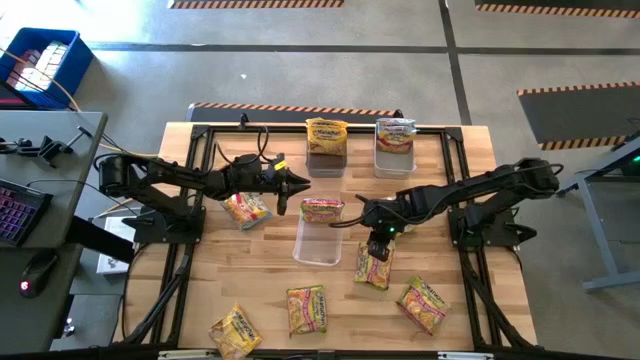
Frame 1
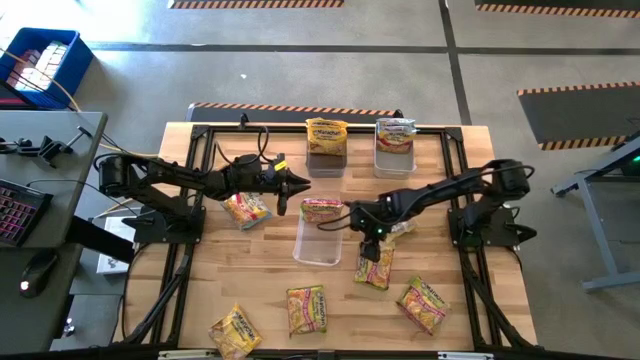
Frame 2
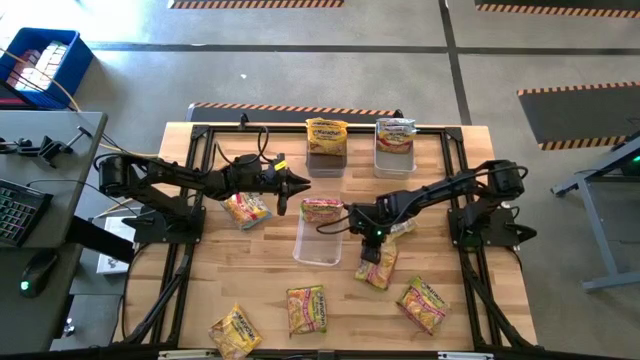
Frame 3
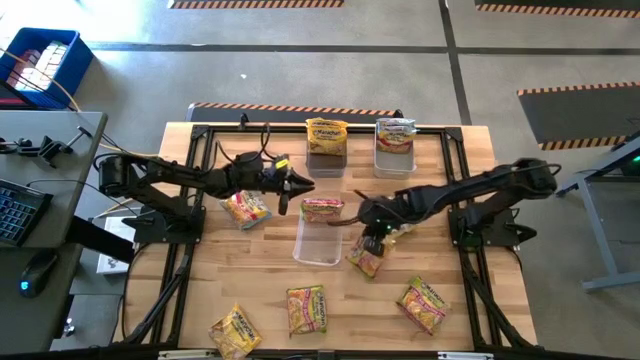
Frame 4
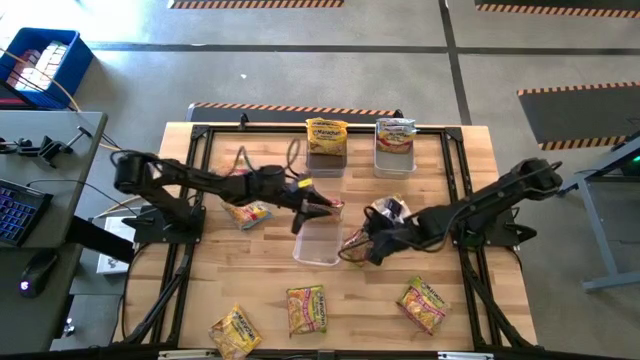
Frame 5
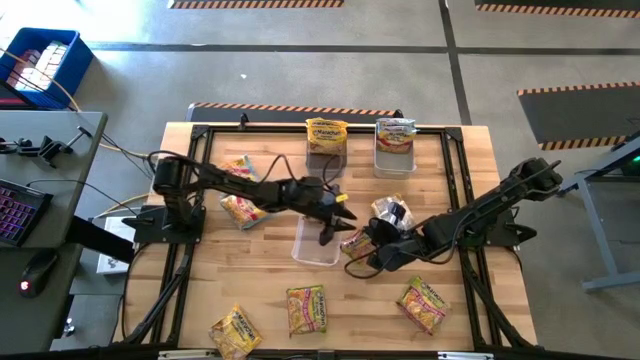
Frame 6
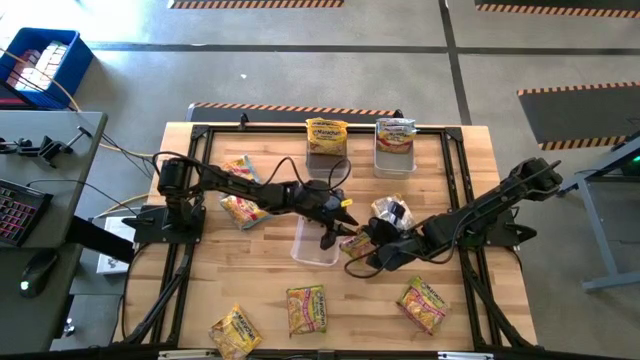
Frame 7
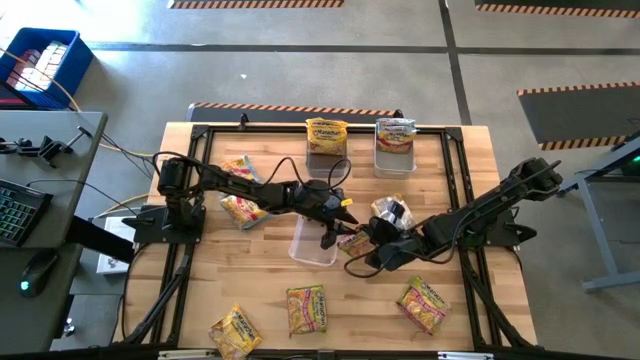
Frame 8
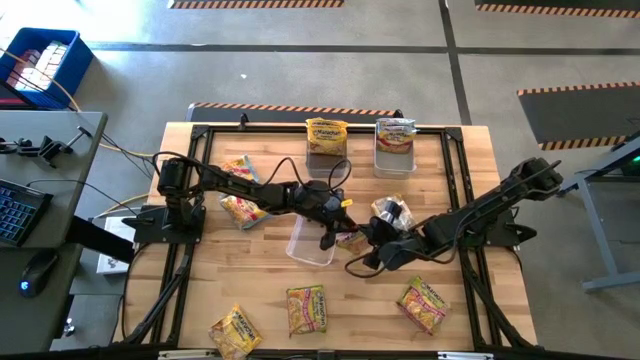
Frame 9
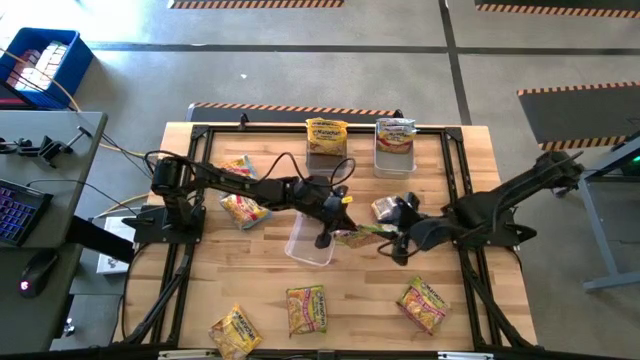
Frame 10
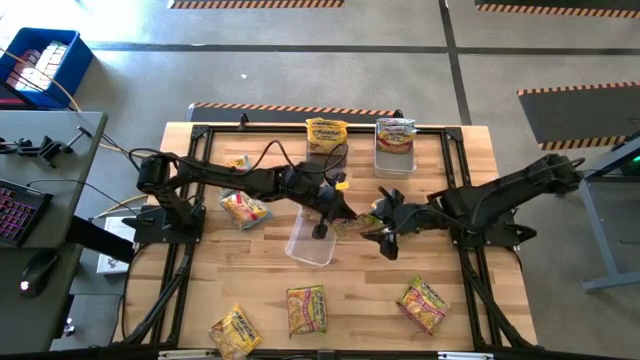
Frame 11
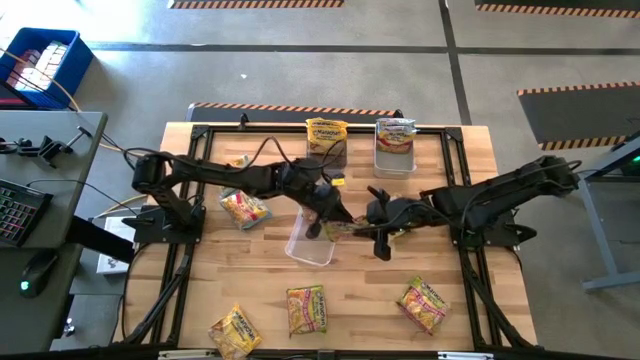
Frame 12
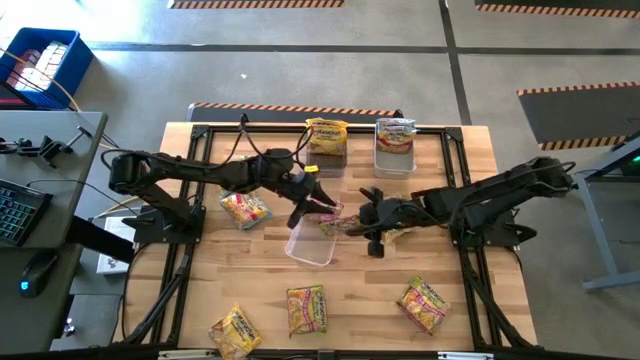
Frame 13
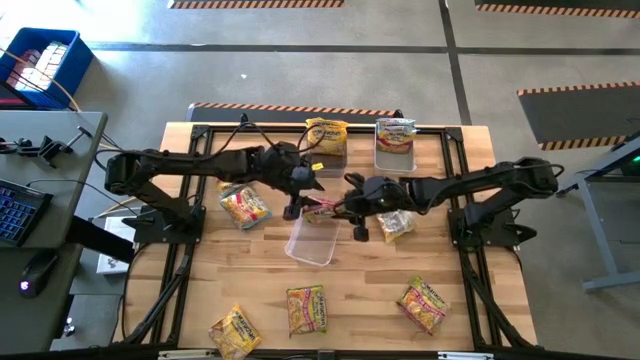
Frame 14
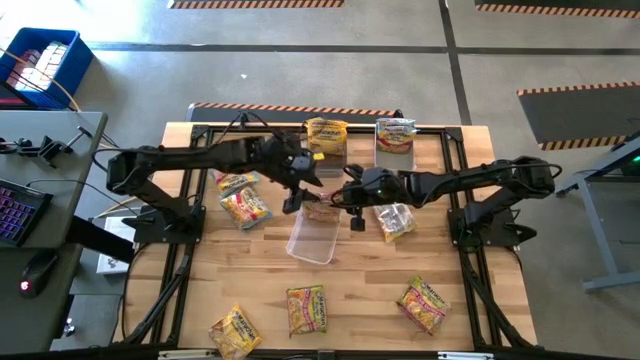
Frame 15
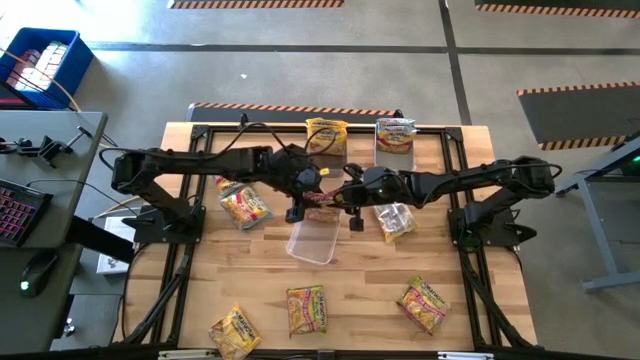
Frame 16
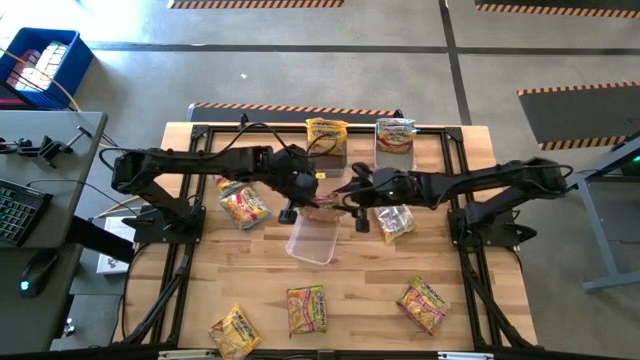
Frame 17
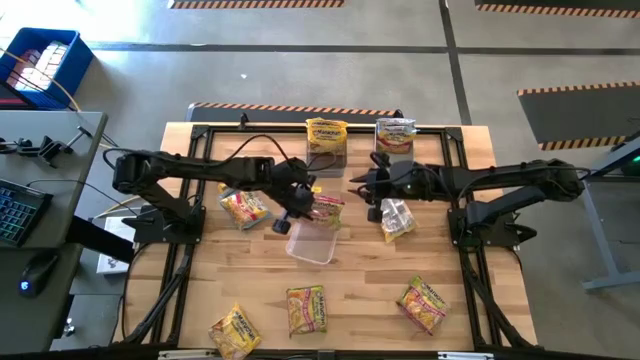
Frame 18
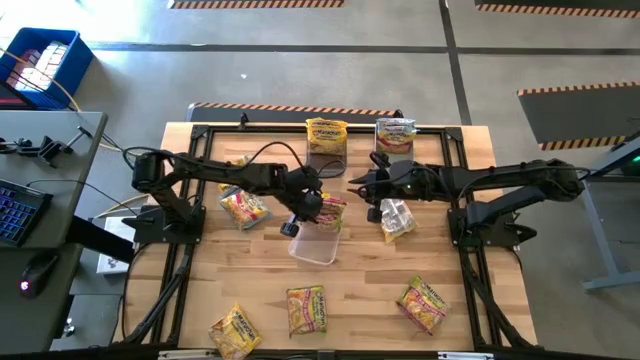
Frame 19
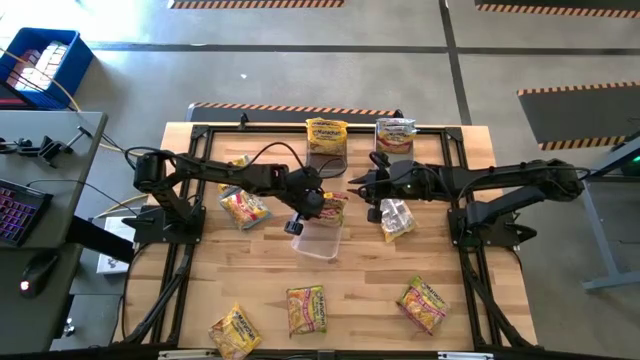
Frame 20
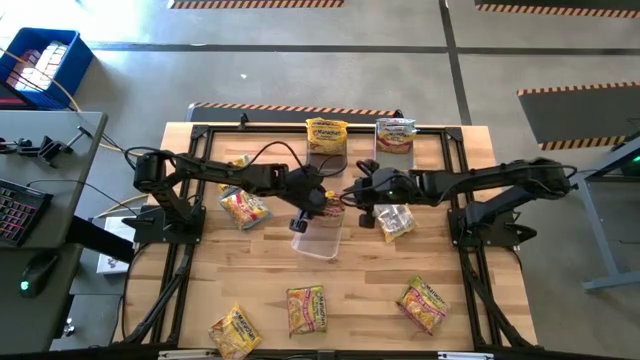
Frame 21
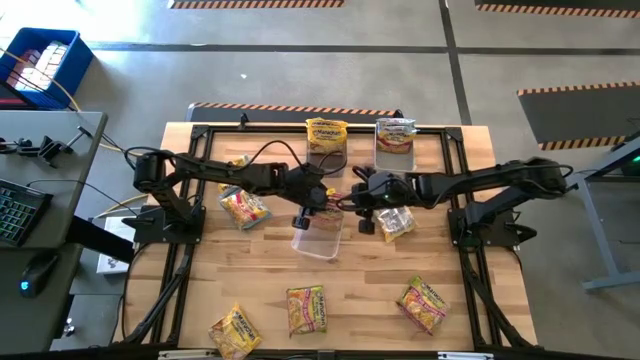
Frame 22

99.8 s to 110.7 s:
Task: Sort Maruchan noodles
Put the green noodle pack into the transparent bin

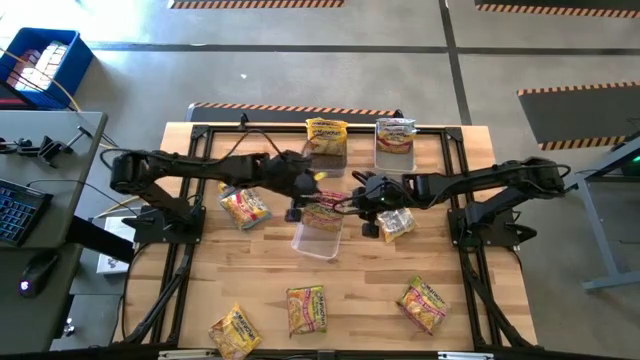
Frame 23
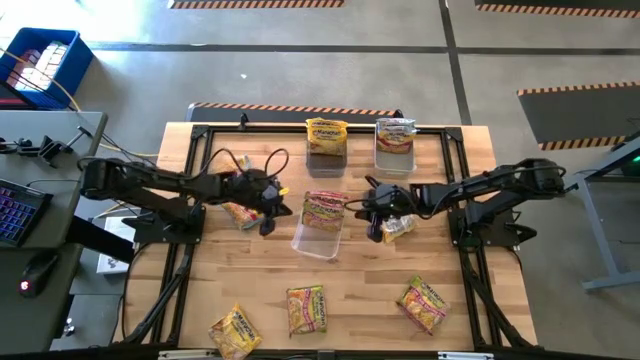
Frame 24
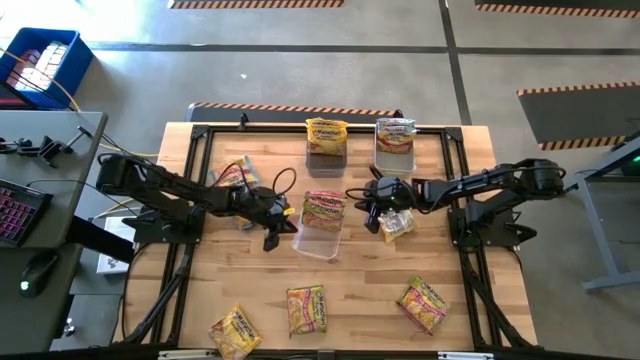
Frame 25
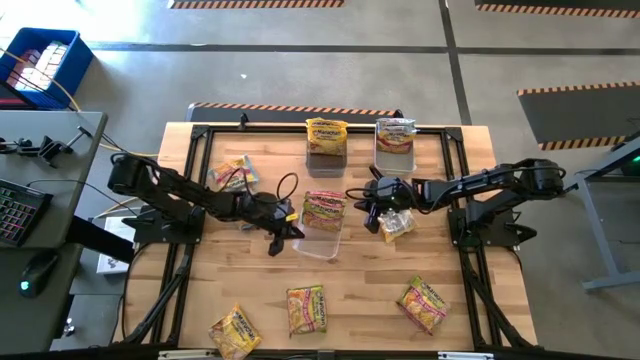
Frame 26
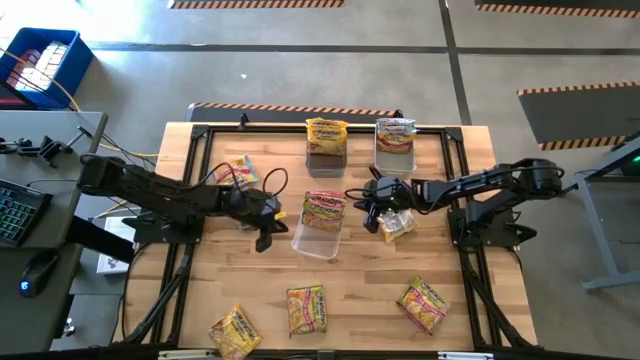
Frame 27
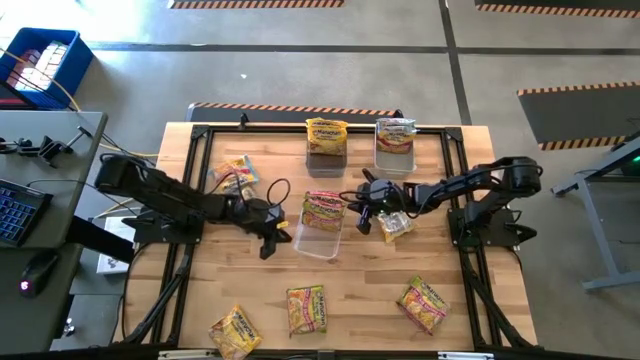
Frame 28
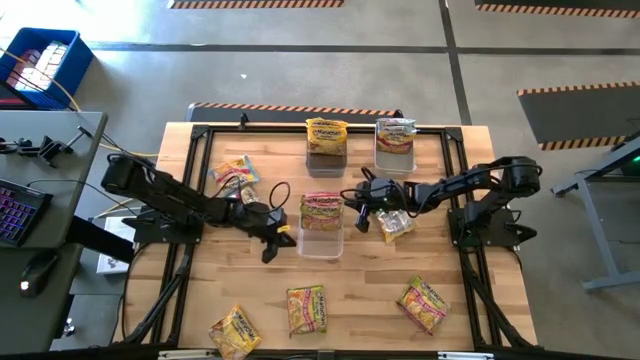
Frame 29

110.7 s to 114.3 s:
Adjust the transparent bin

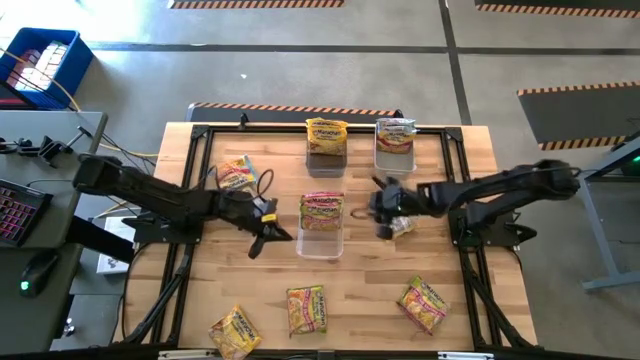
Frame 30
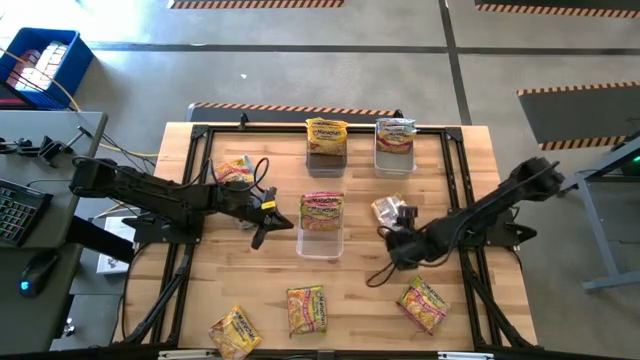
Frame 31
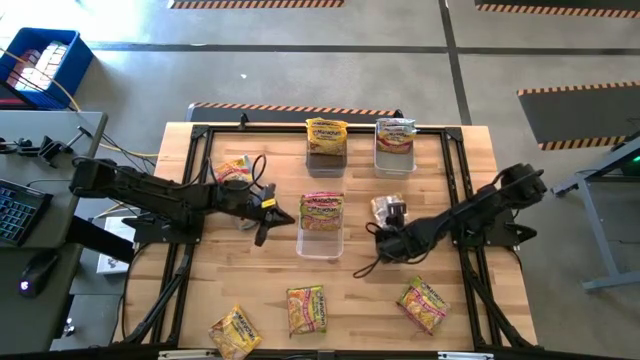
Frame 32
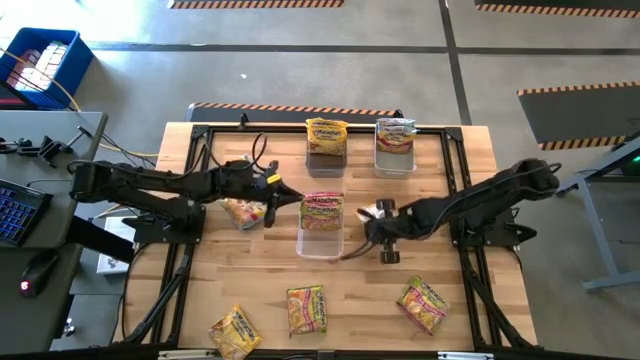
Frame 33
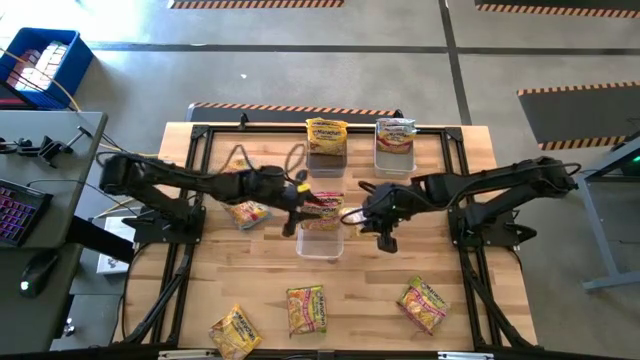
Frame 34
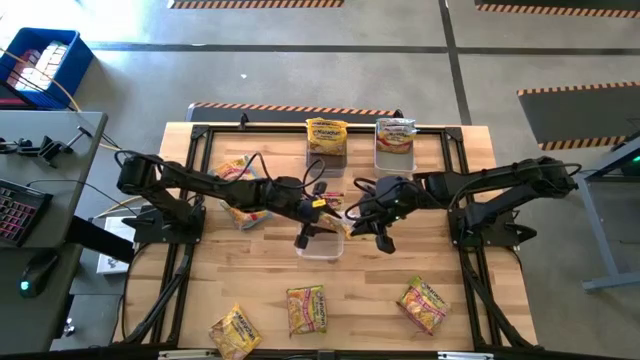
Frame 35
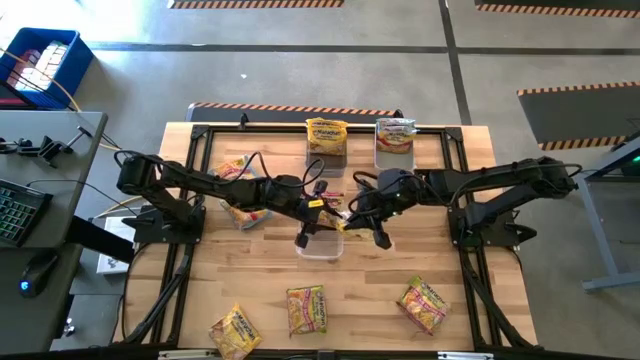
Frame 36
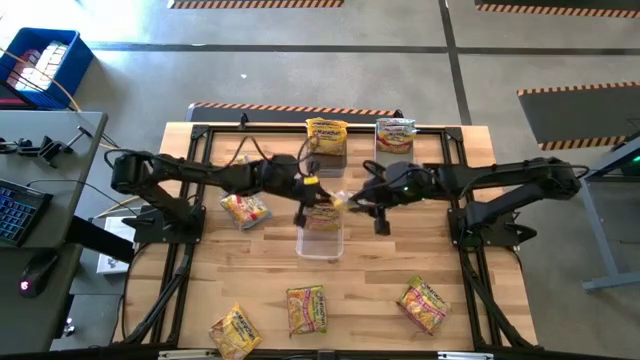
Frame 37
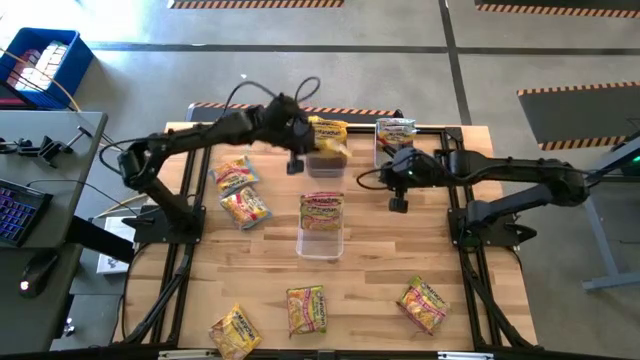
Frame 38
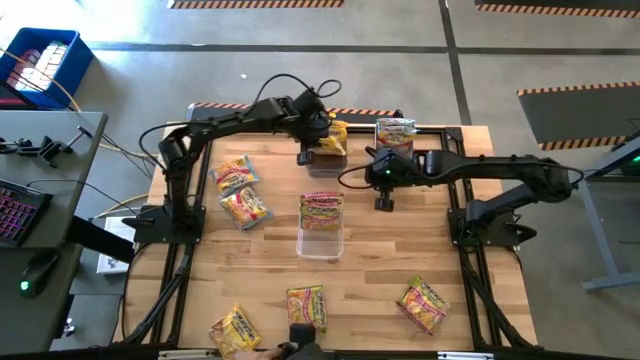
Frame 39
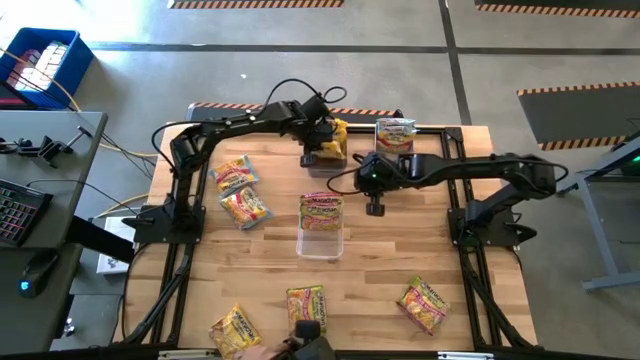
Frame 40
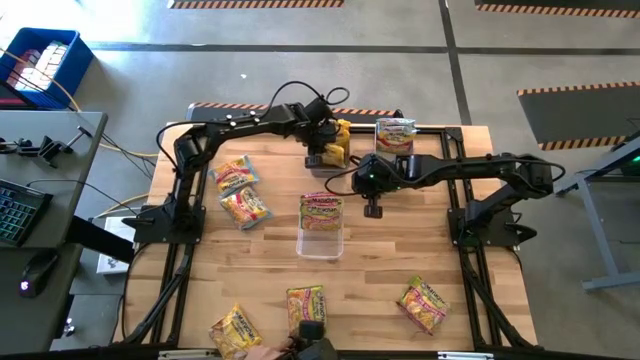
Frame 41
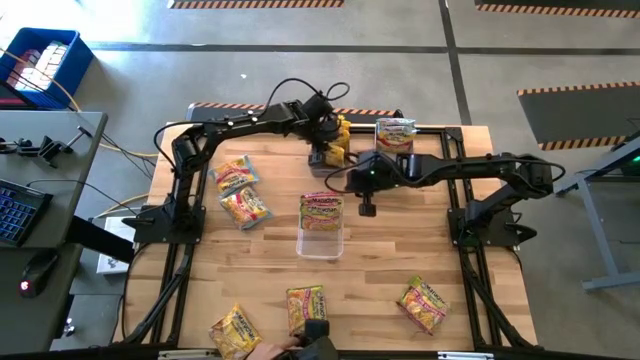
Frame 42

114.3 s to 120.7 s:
Put the yellow noodle pack into the black bin

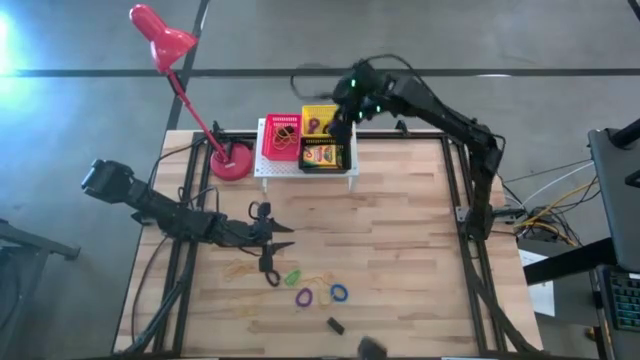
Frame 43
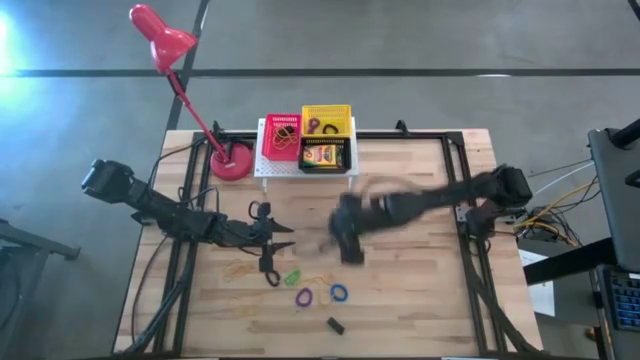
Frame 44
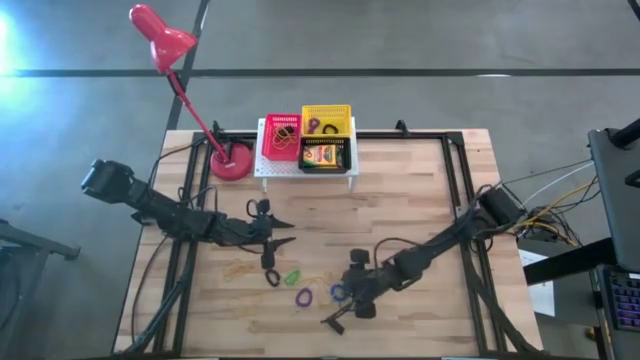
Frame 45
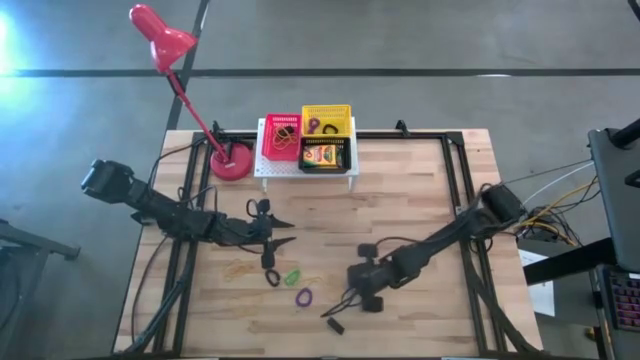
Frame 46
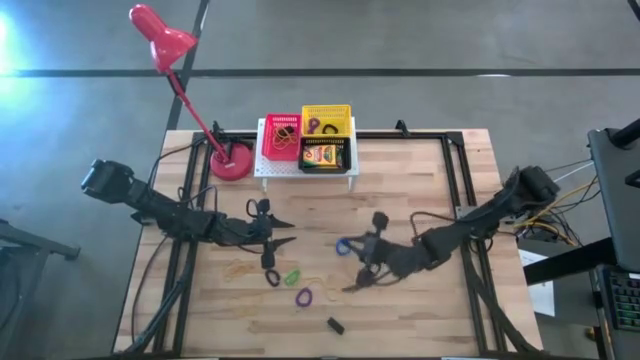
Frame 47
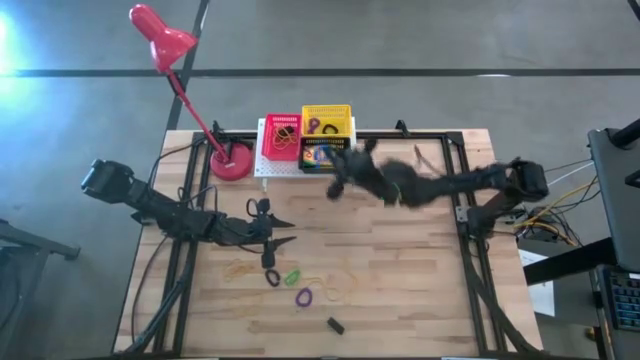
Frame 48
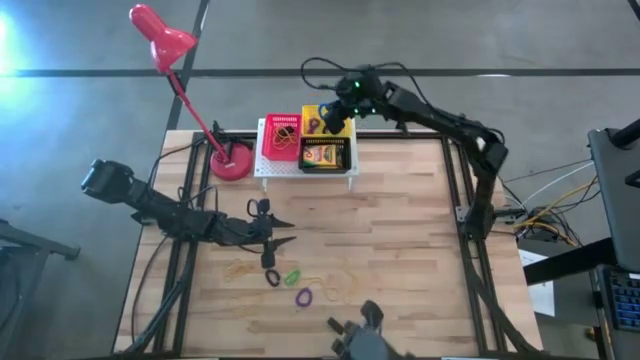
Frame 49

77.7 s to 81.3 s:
Task: Pick & Place Office Desk Supplies
Put the blue spring keychain into the yellow bin on the shelf
